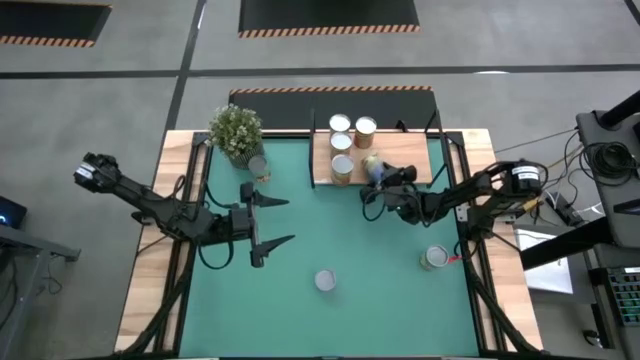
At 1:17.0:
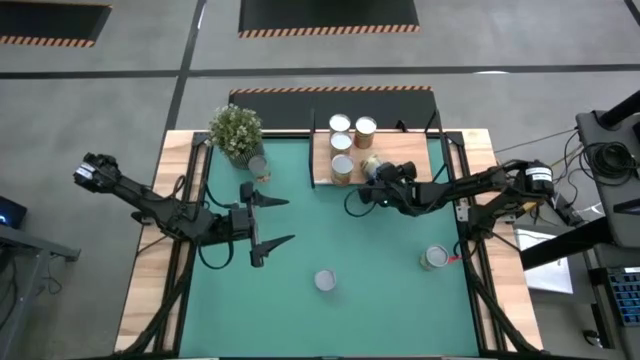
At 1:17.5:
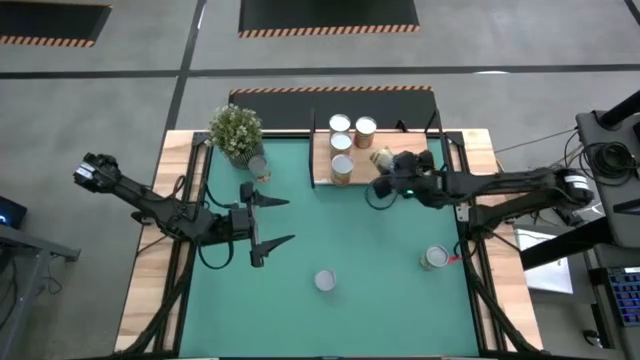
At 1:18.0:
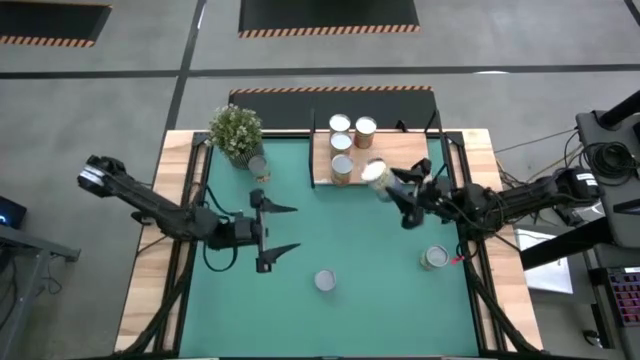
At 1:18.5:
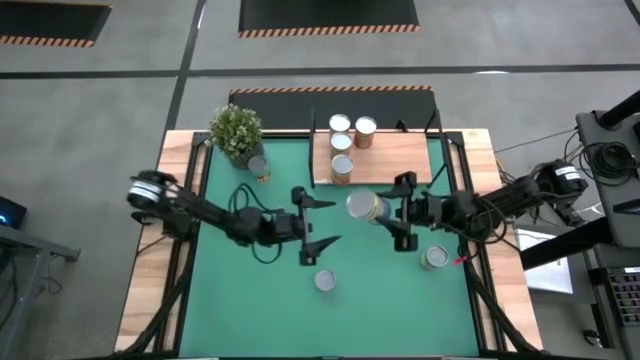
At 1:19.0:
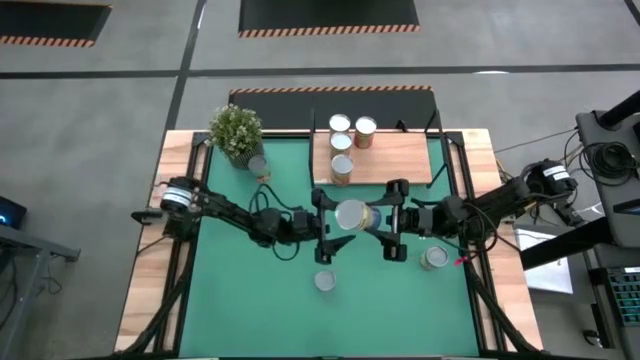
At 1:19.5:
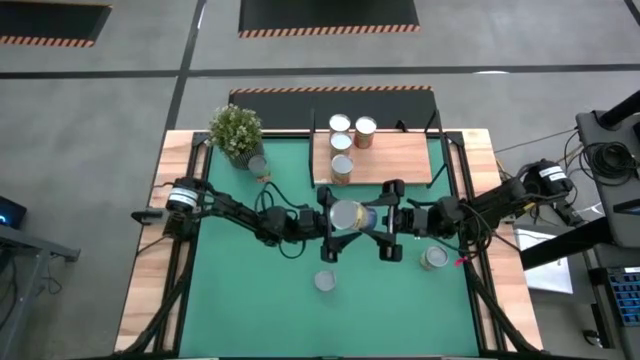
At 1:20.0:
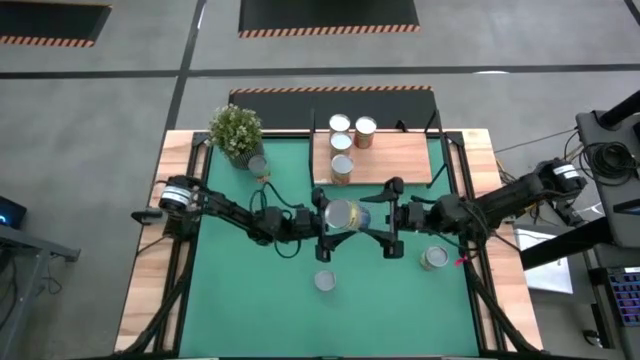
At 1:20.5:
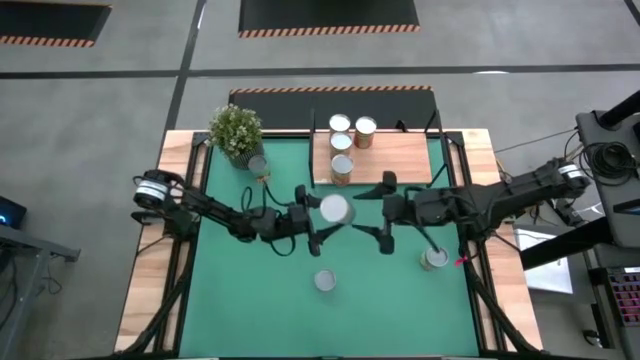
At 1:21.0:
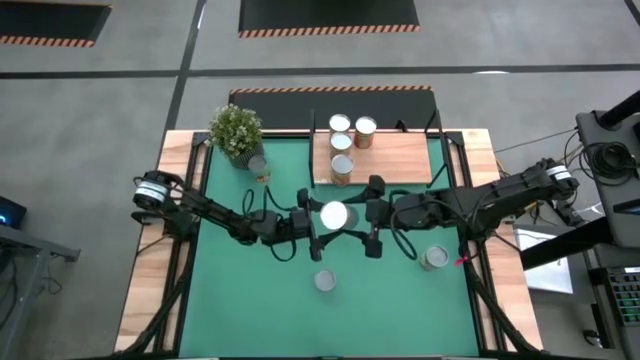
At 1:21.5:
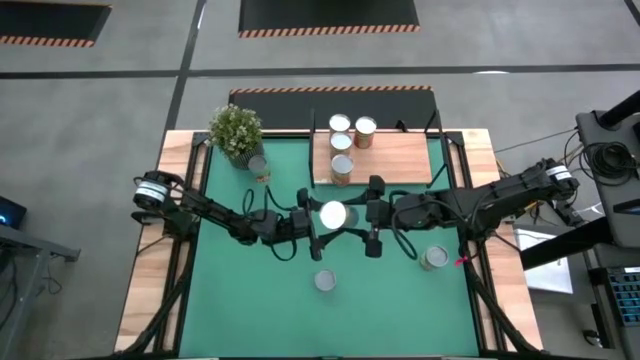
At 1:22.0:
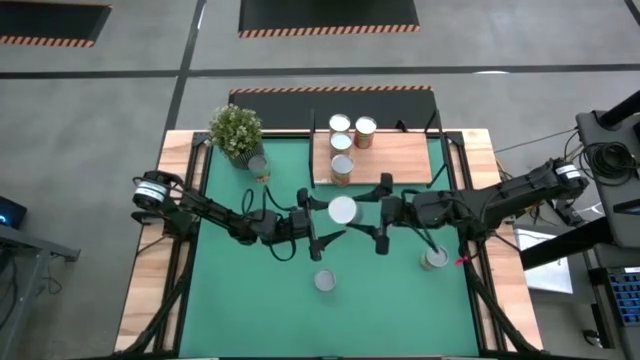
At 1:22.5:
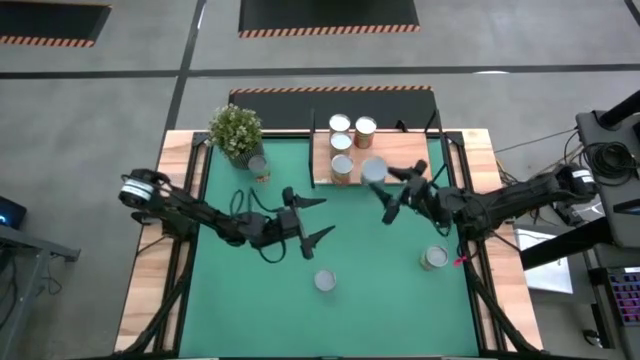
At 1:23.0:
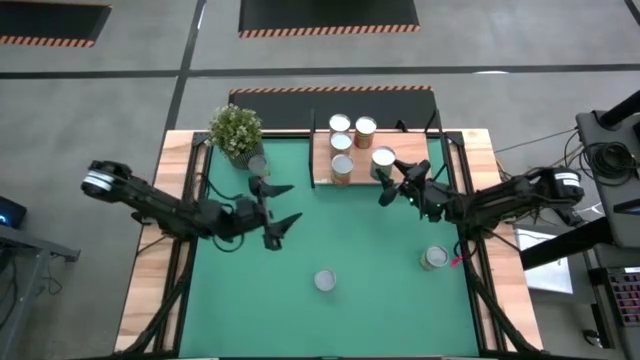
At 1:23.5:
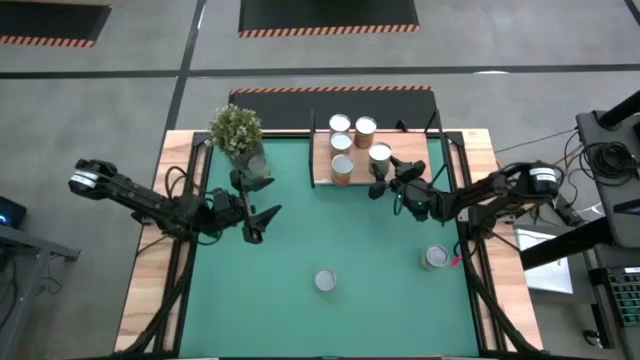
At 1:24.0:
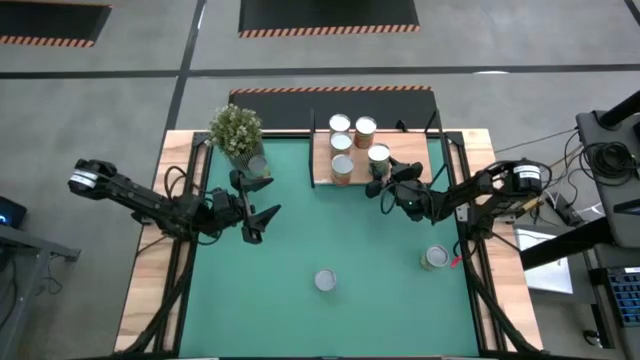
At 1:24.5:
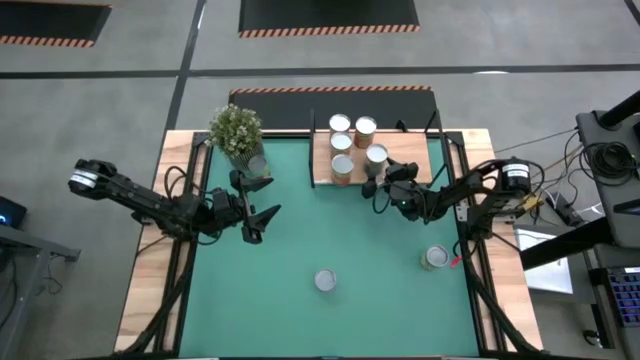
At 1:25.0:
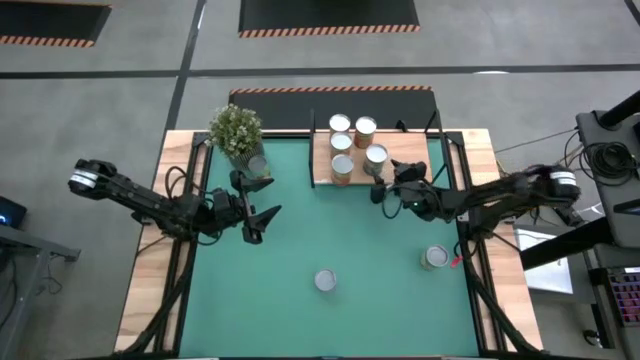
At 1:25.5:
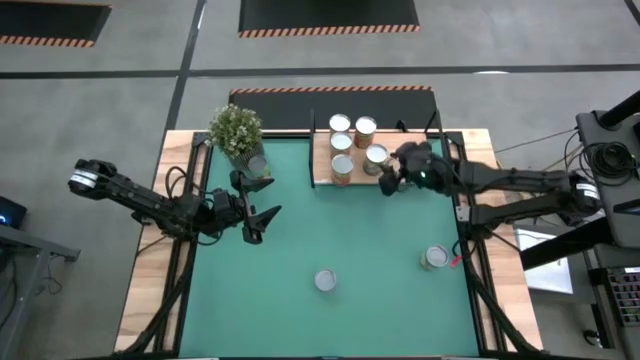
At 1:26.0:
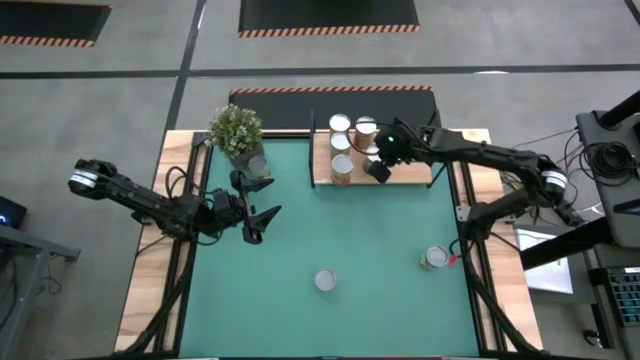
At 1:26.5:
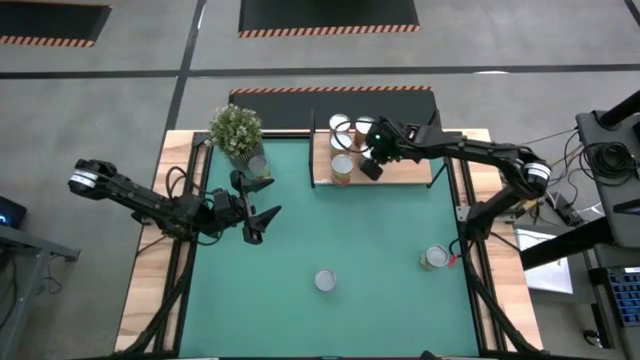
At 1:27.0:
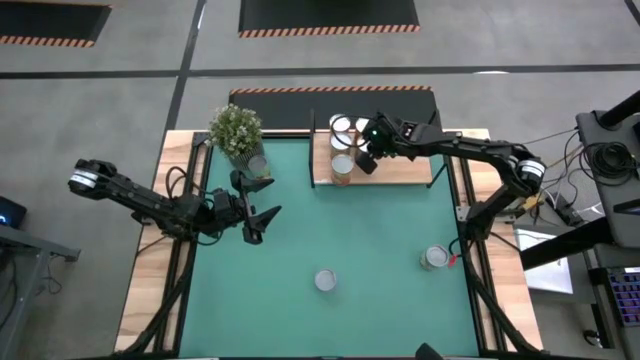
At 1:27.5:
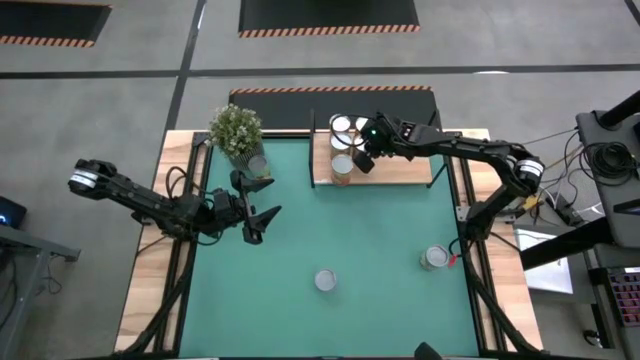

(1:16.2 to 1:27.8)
Task: Pick and place cans onto a shelf
Put the purple can on the shelf

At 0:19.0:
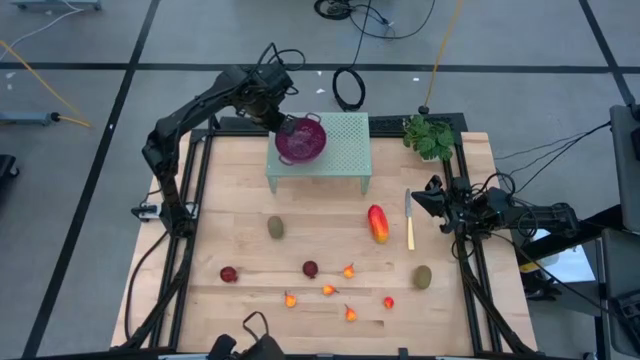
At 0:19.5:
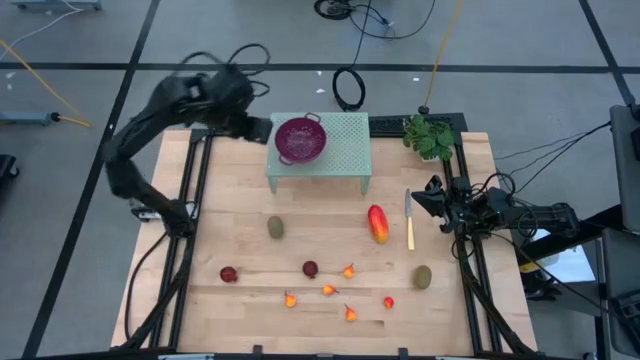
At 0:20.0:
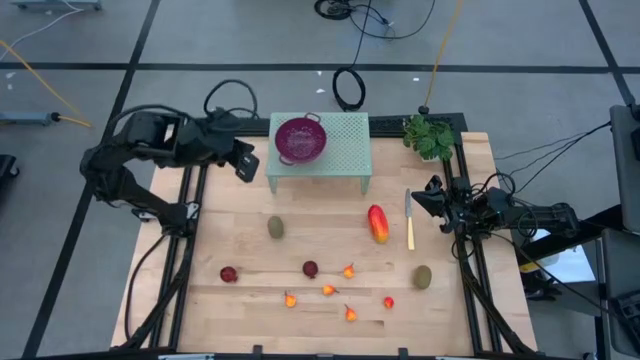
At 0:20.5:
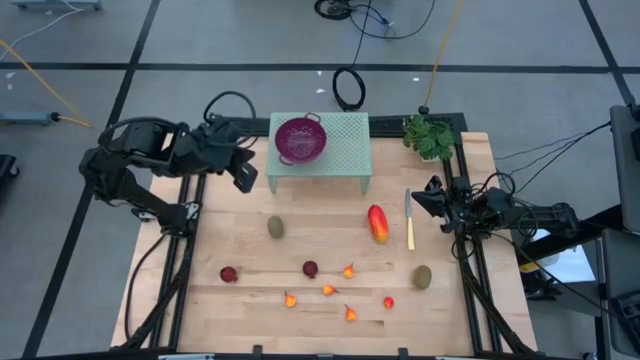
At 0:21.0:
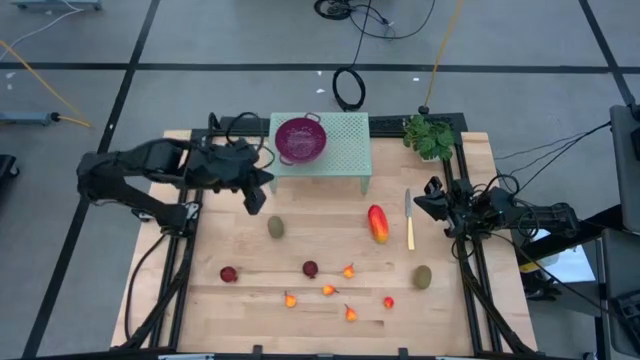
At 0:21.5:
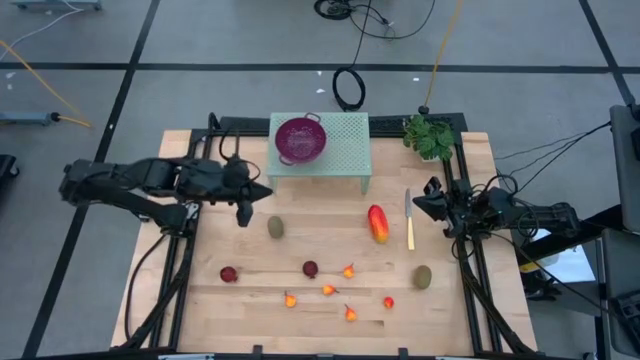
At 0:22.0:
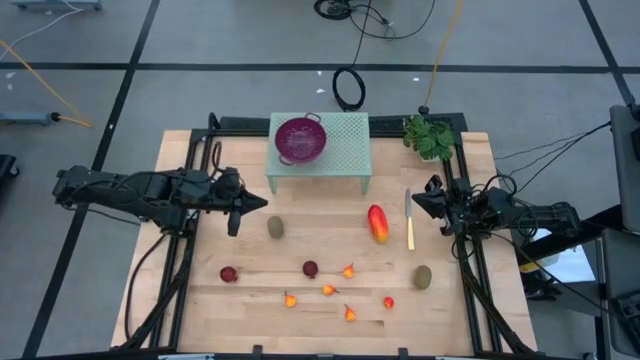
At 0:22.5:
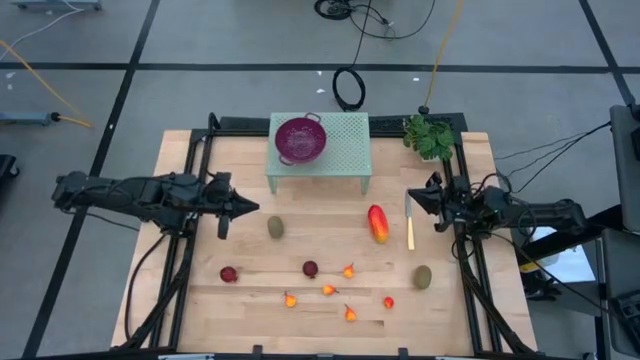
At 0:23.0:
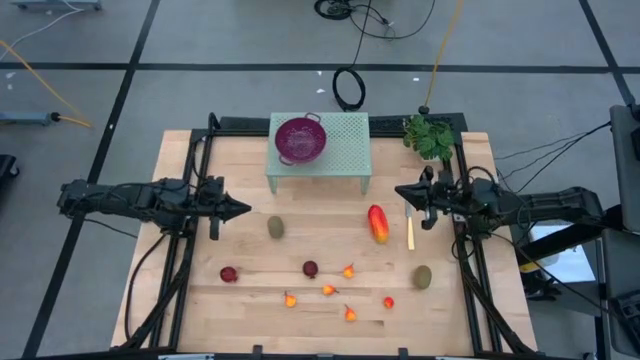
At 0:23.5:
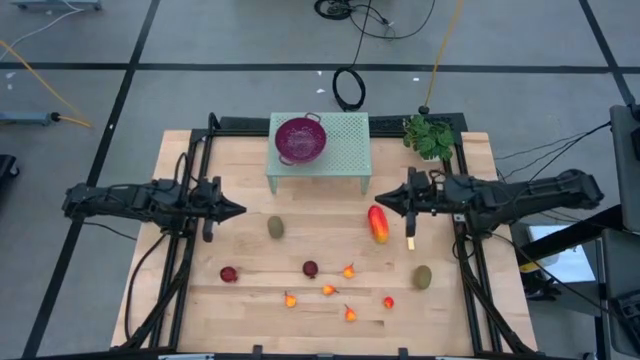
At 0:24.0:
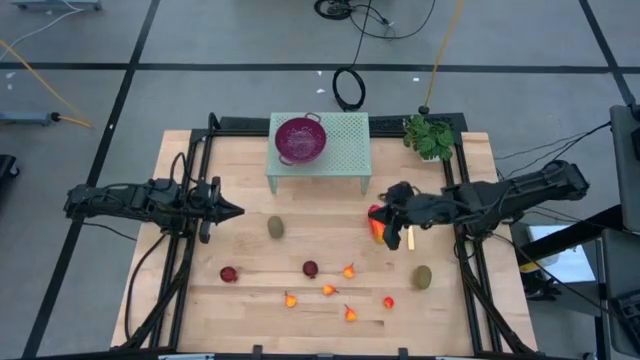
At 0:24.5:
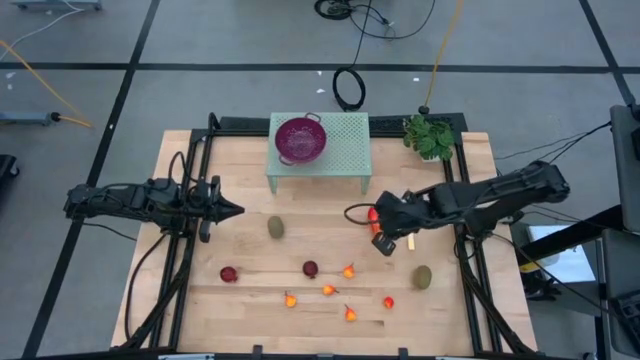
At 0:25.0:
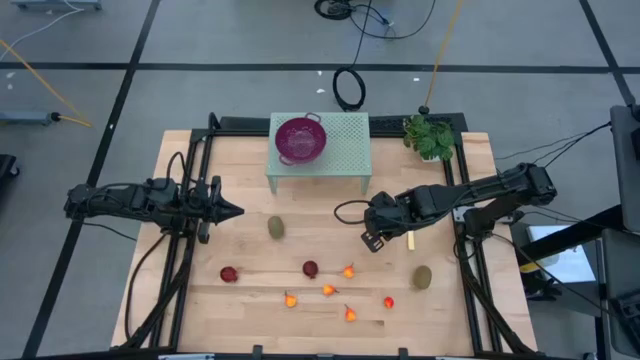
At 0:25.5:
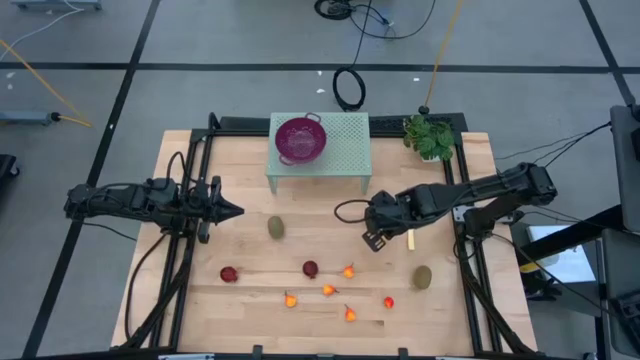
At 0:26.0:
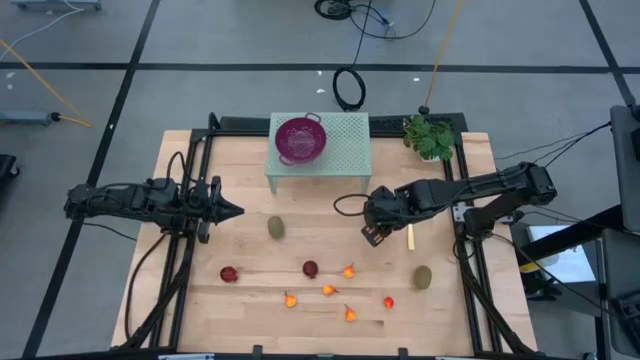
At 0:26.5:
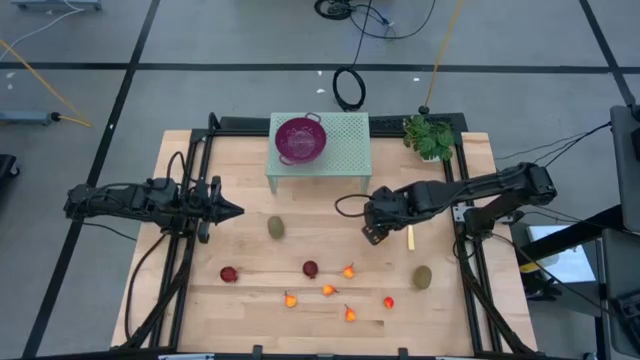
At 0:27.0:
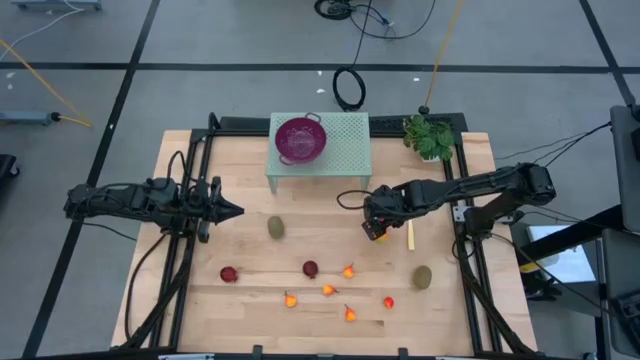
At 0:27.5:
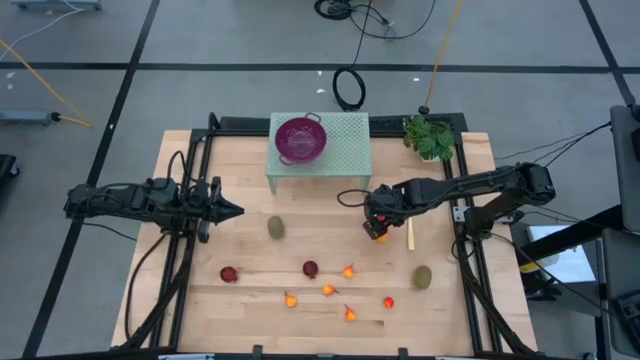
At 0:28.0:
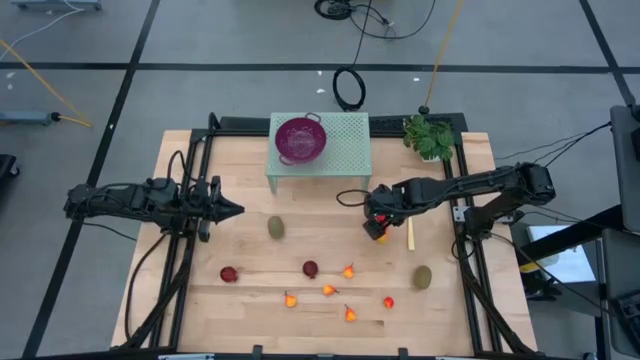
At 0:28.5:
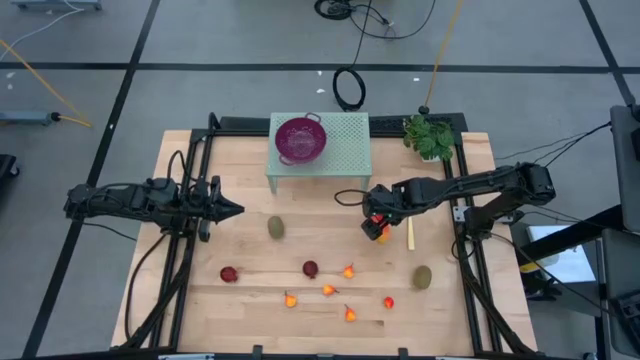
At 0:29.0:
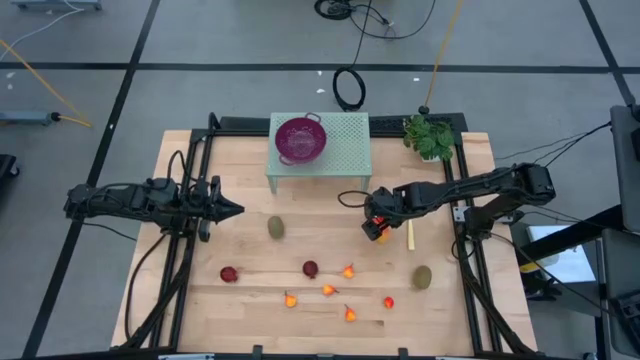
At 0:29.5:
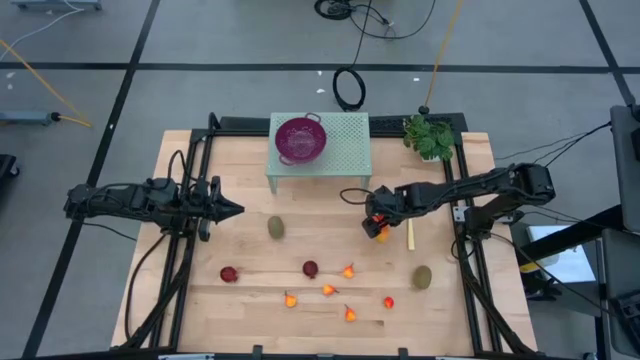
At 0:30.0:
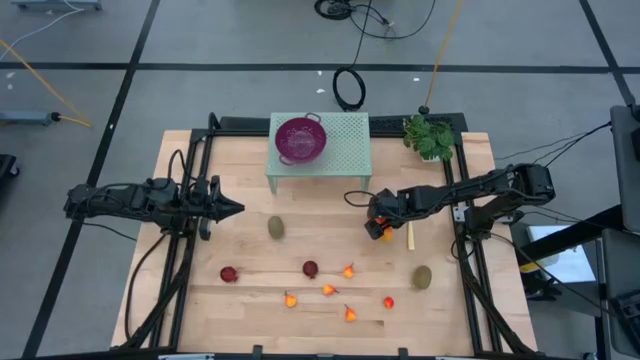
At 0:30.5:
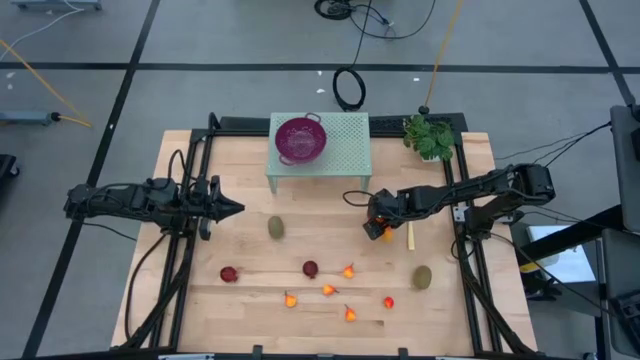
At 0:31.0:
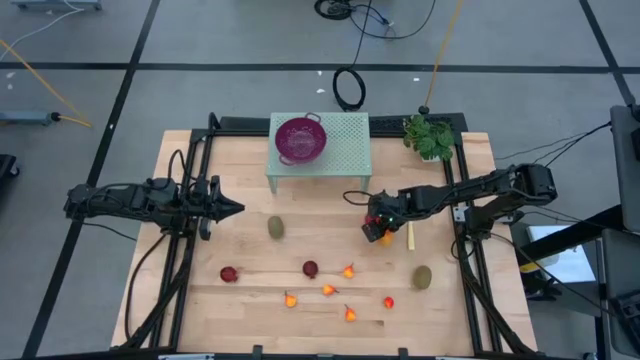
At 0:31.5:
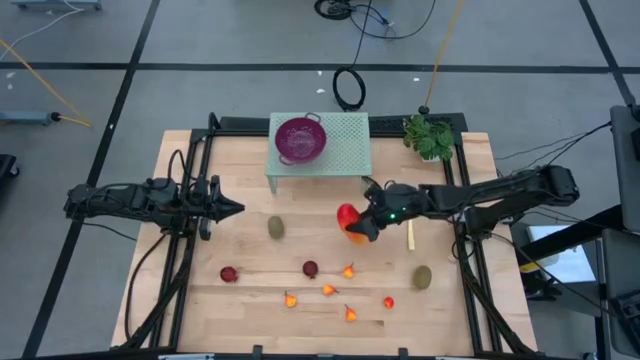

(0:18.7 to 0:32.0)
Task: Pick & Place Fruit
Put the mango into the violet strainer bowl on the shelf
